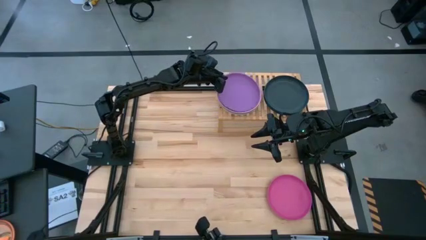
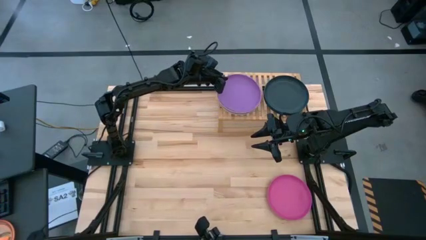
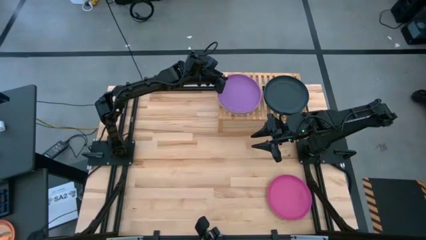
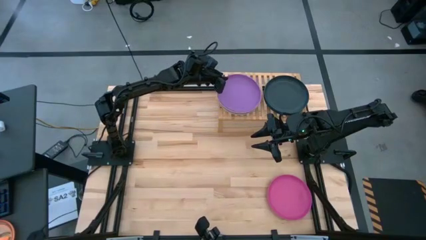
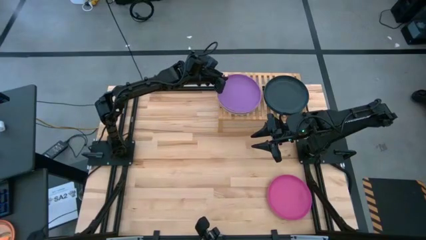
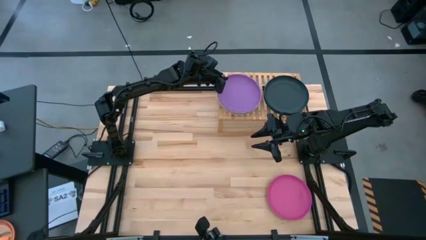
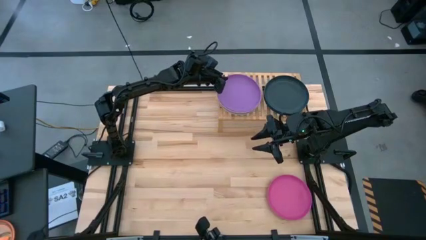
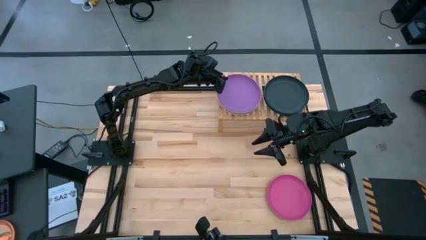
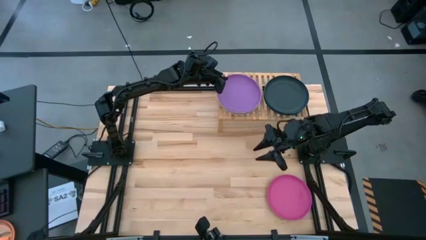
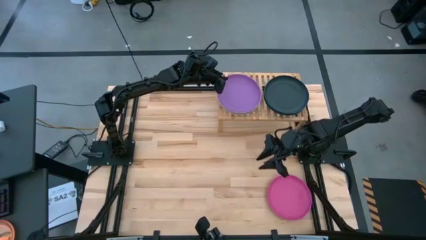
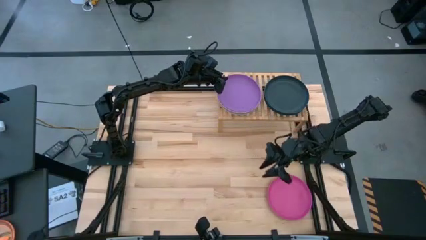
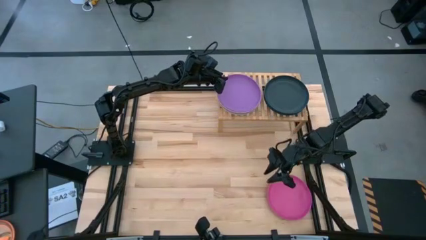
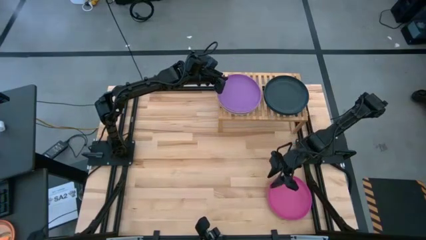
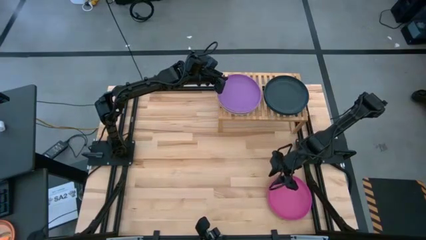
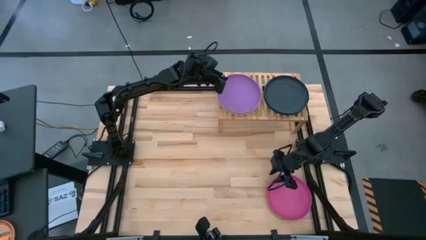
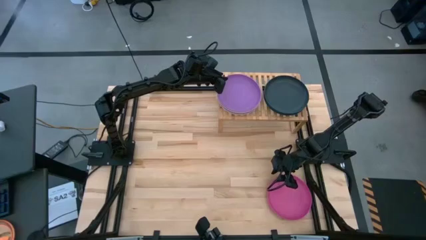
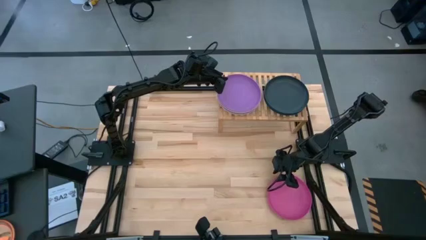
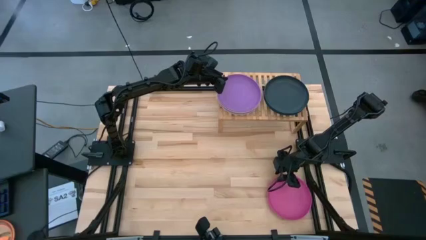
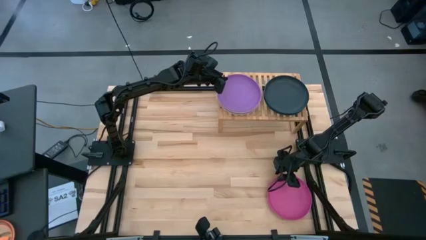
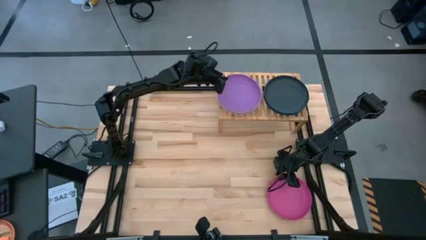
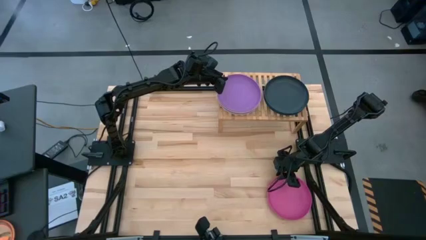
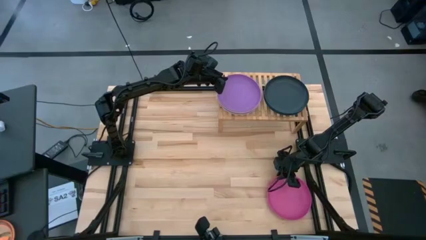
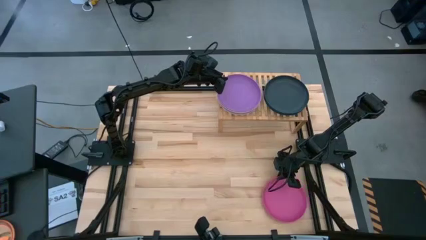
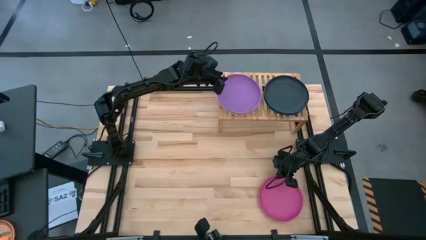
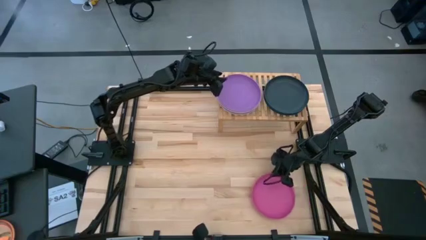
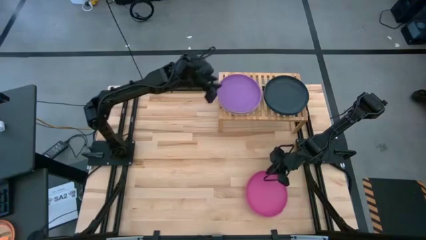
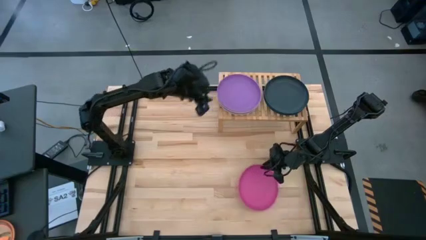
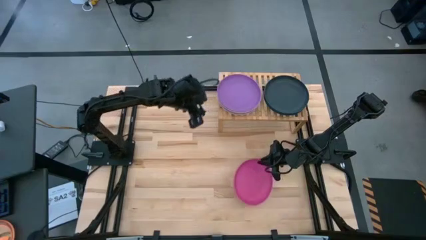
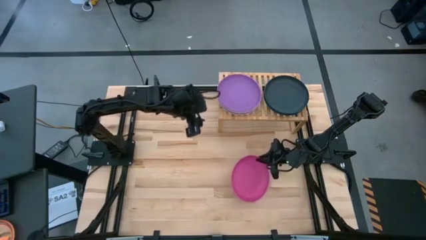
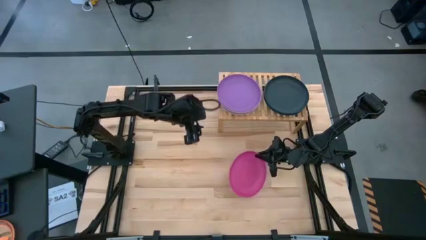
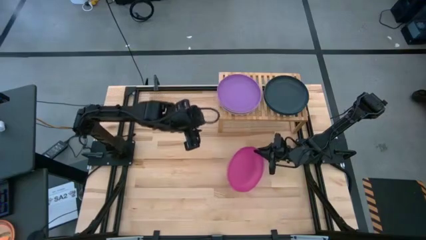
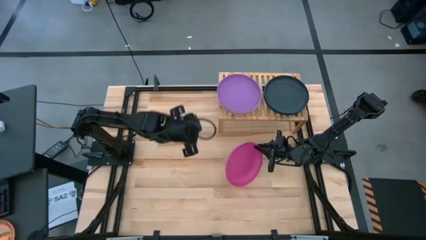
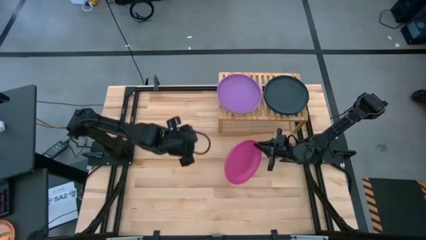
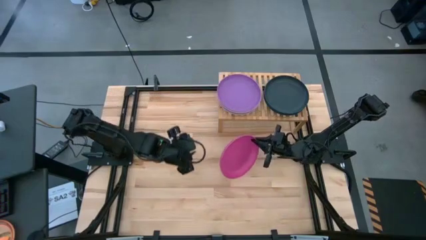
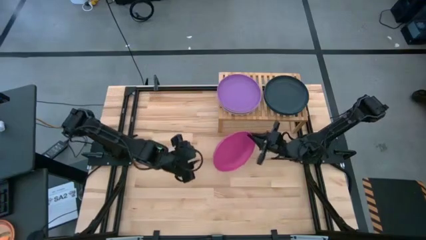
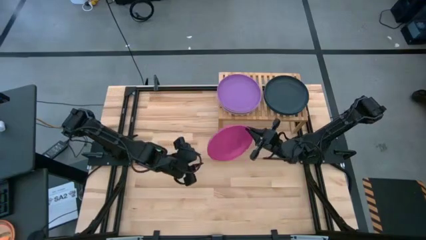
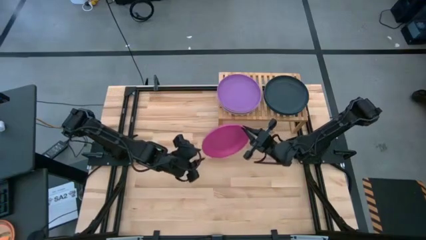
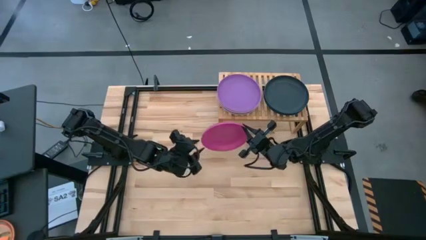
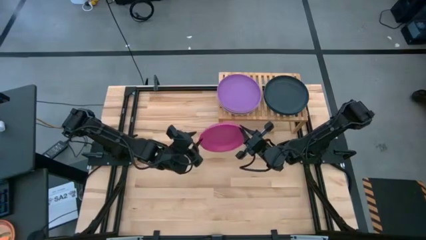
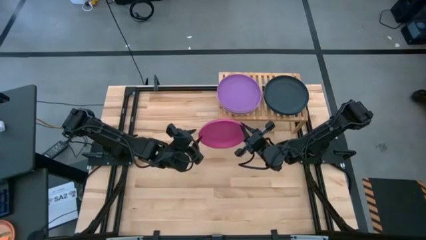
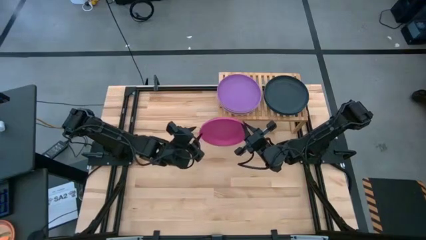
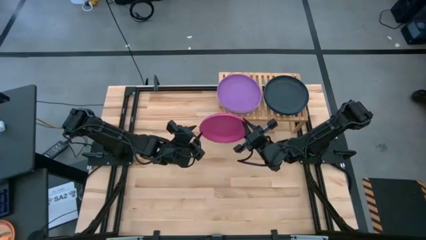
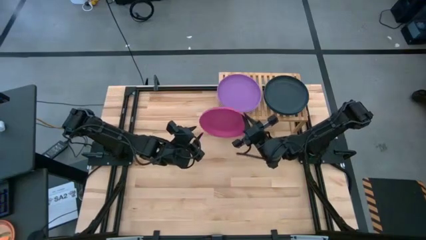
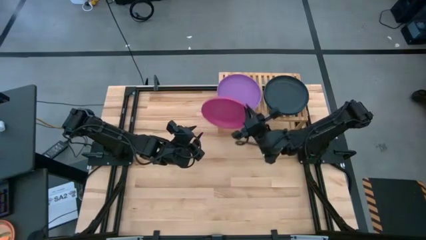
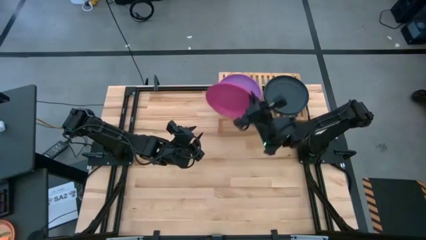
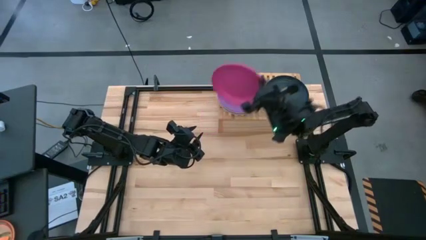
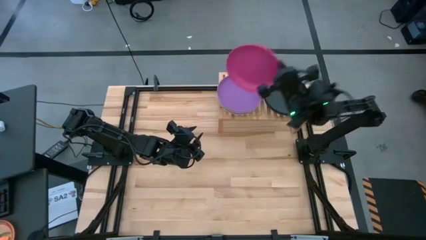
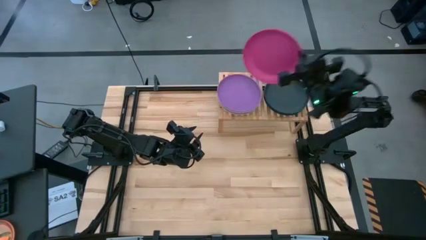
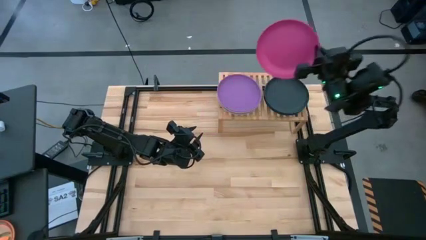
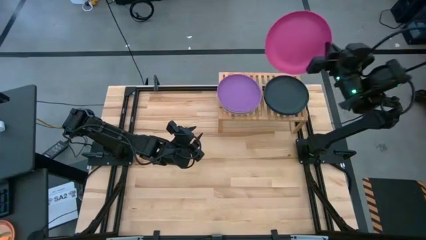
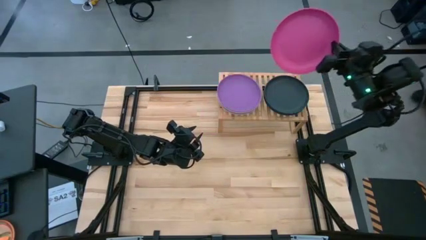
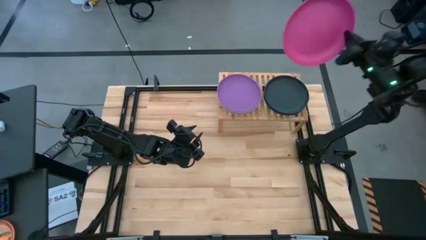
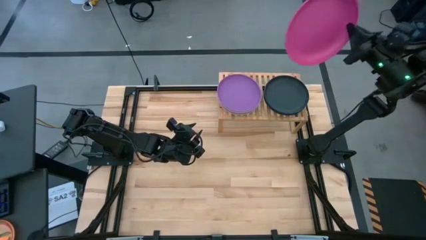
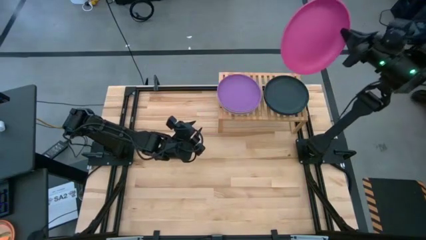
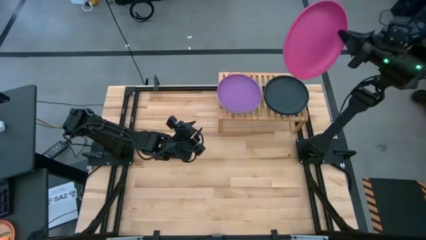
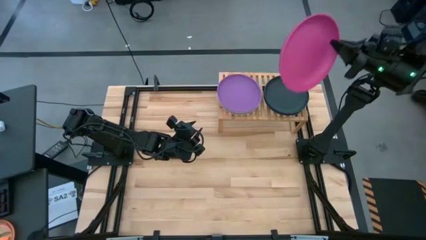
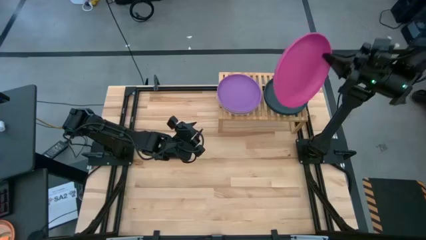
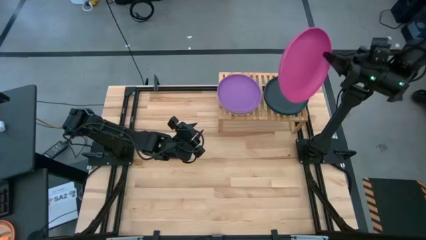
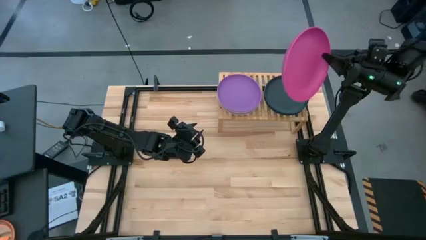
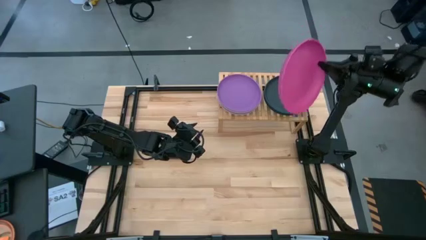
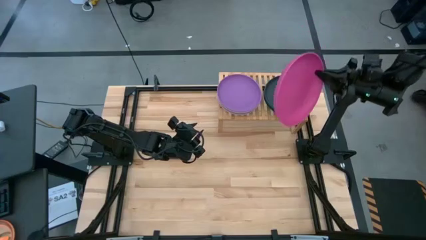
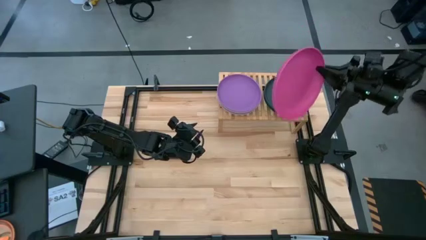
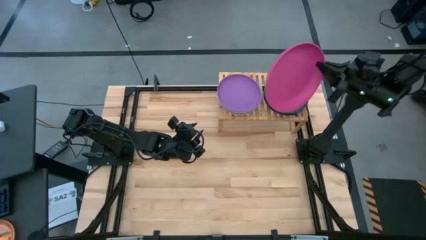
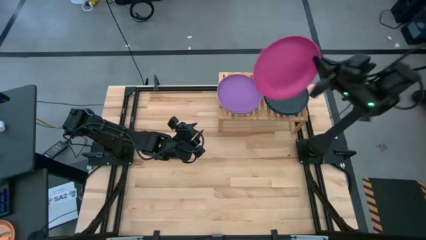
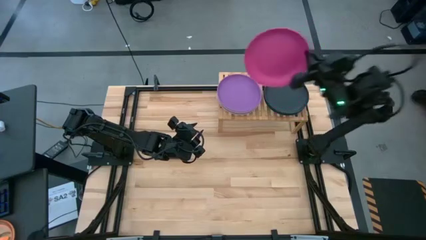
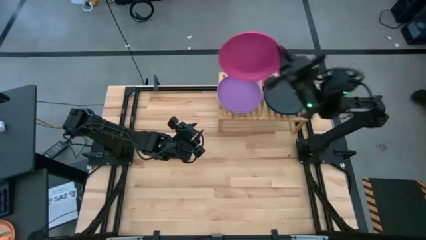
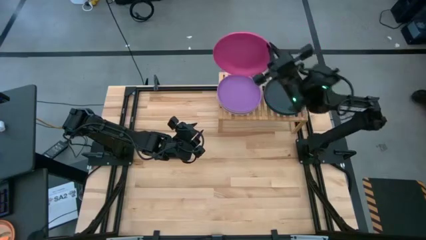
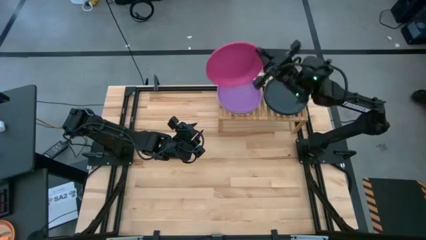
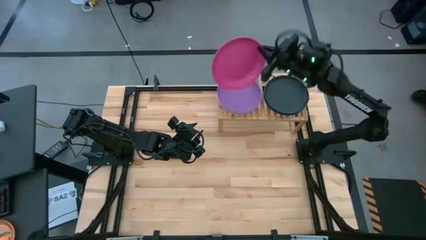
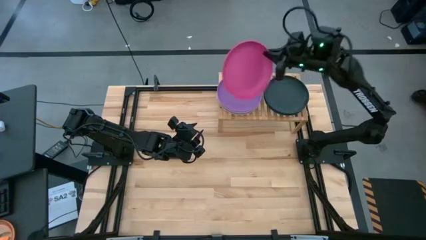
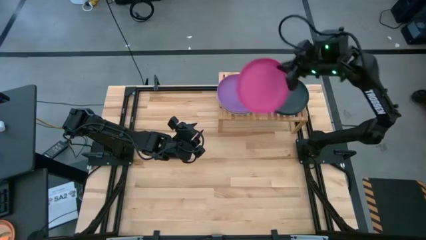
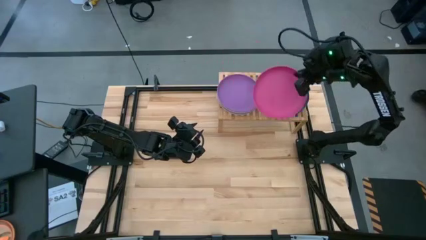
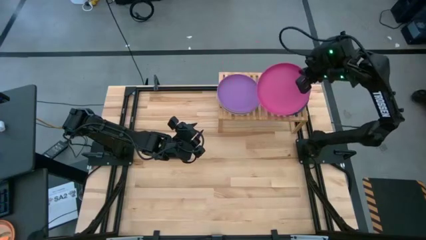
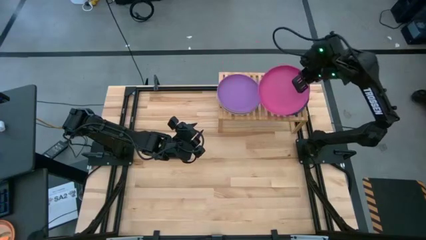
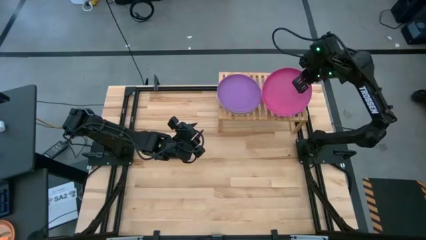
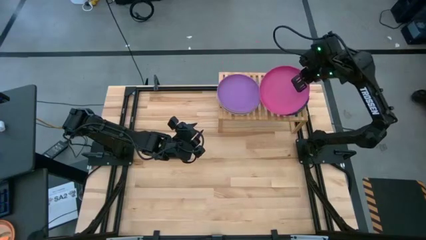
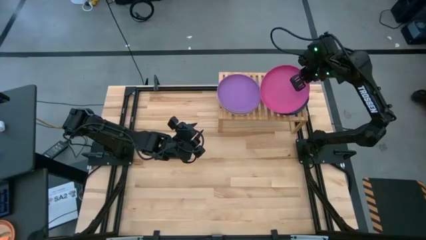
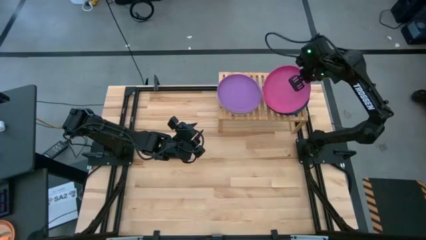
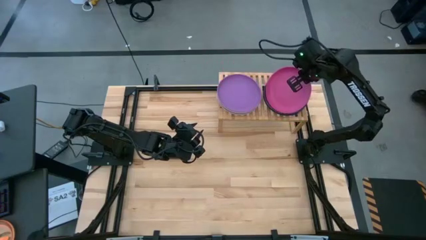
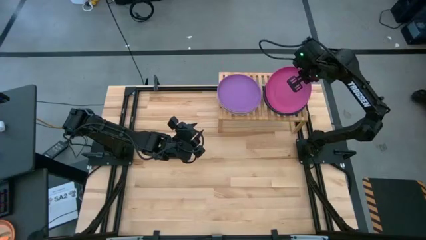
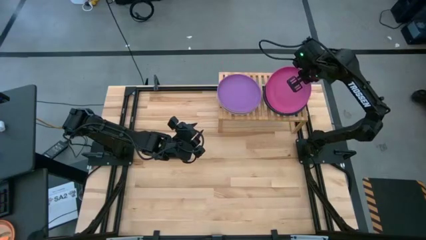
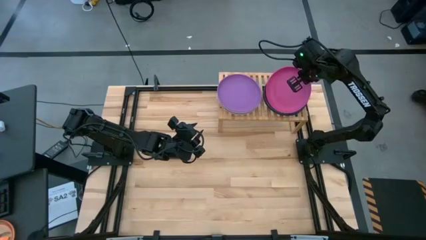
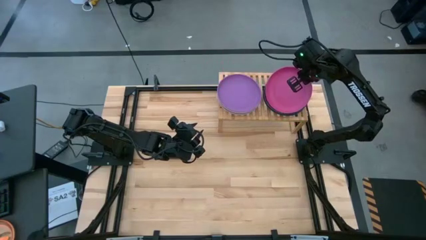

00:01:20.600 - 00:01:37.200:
Task: Place and stack plates onto a shelf
Stack the pink plate on the top of black plate on the shelf
